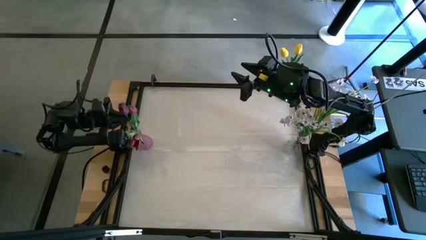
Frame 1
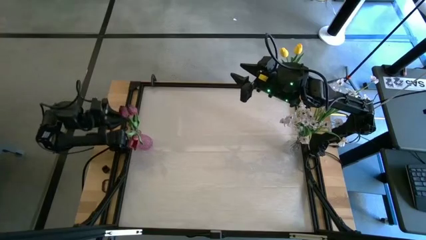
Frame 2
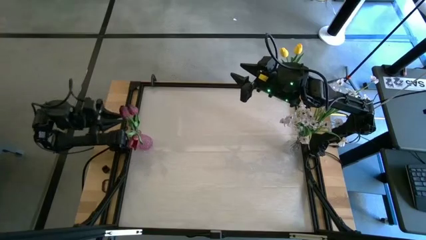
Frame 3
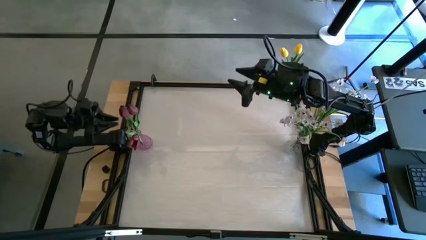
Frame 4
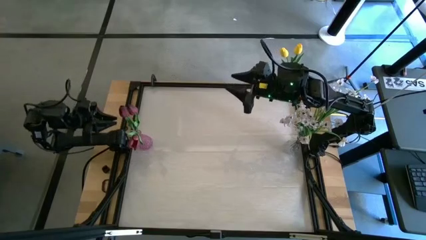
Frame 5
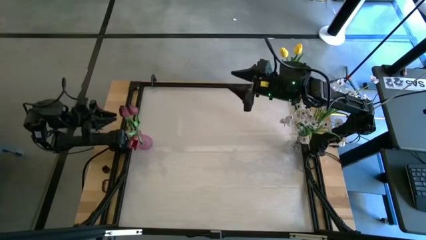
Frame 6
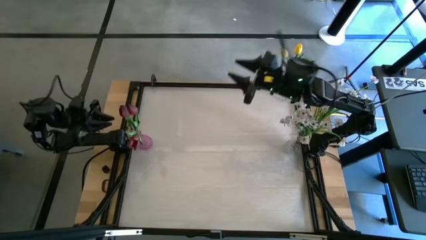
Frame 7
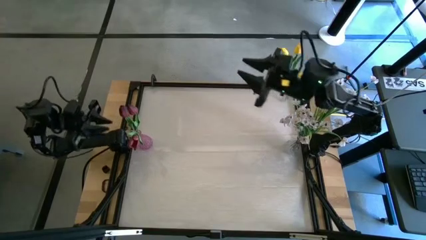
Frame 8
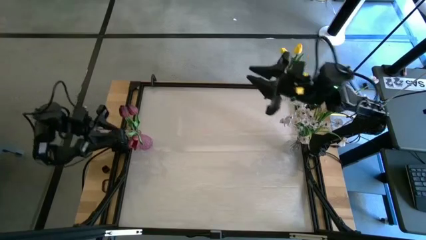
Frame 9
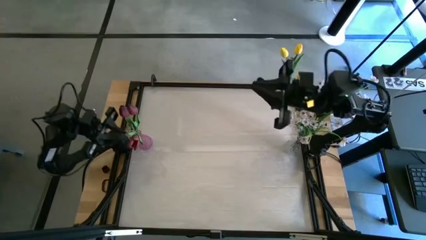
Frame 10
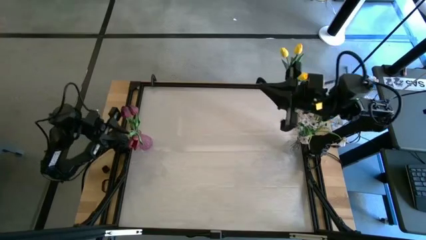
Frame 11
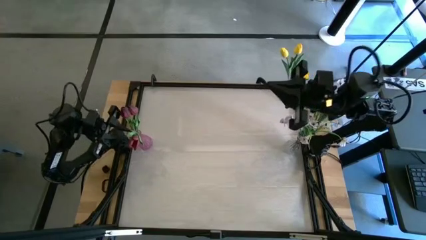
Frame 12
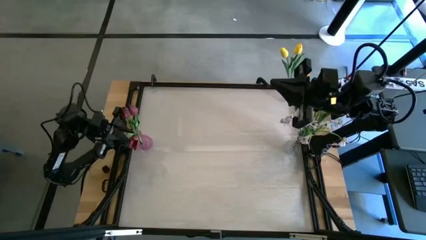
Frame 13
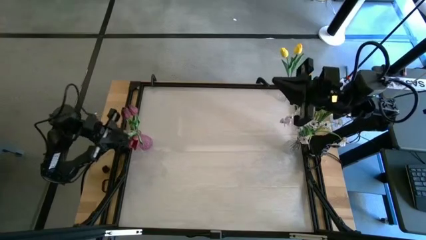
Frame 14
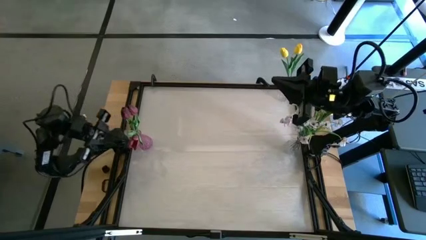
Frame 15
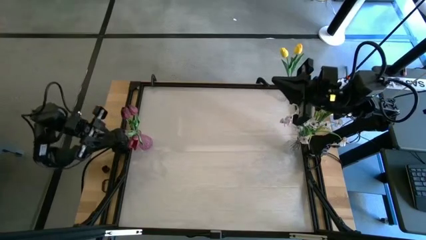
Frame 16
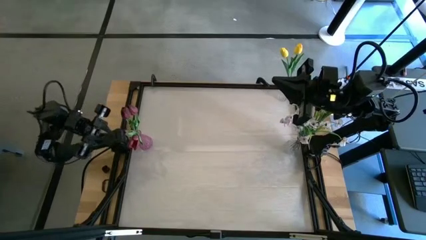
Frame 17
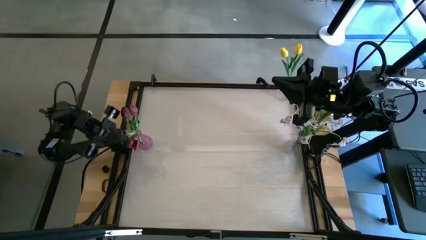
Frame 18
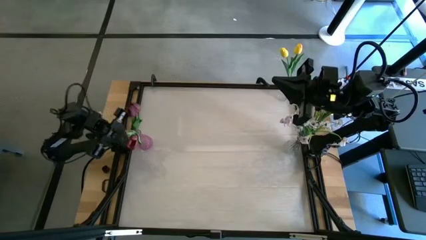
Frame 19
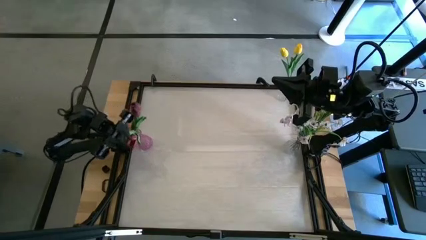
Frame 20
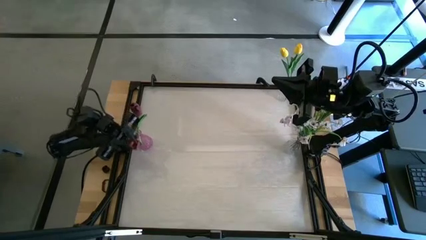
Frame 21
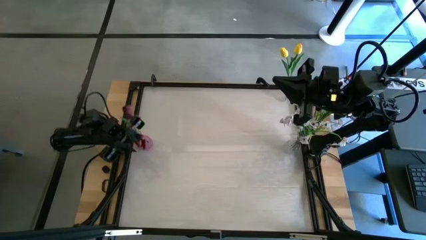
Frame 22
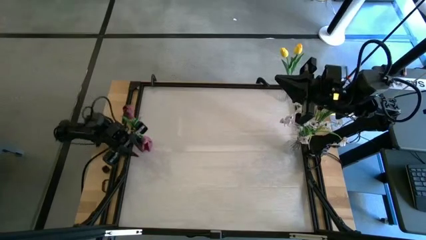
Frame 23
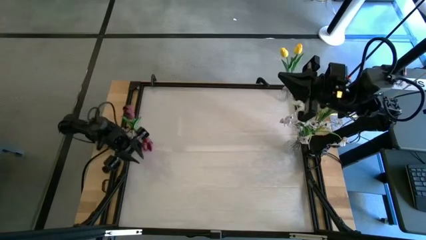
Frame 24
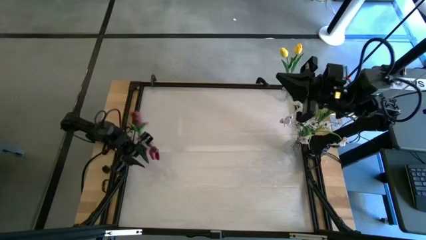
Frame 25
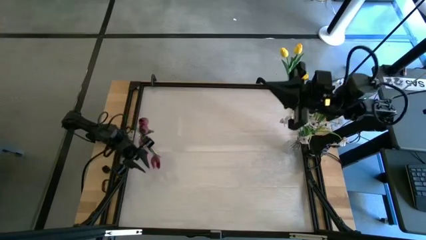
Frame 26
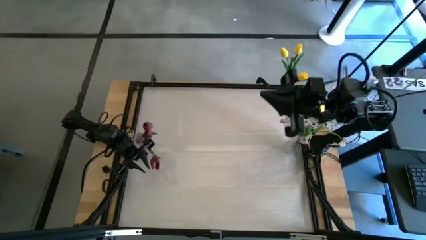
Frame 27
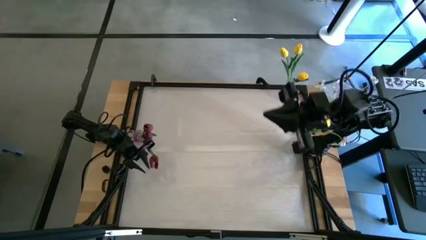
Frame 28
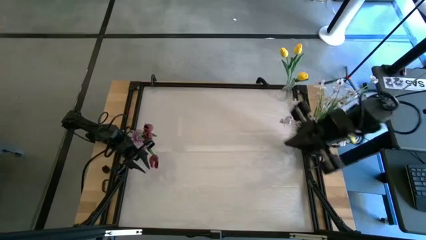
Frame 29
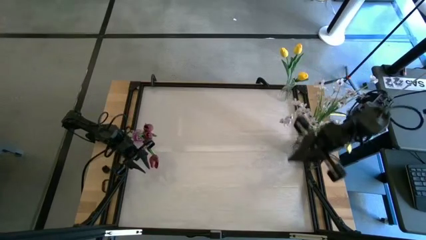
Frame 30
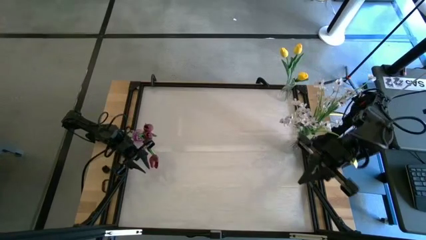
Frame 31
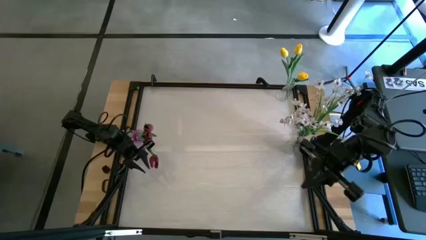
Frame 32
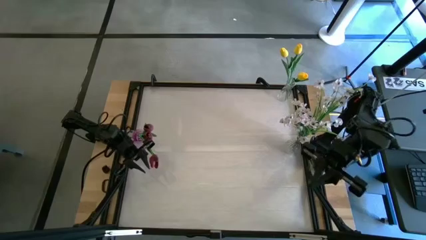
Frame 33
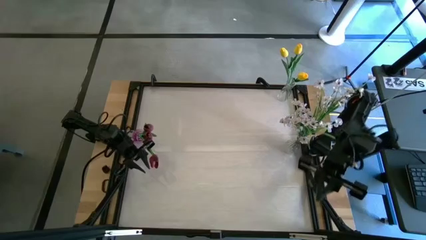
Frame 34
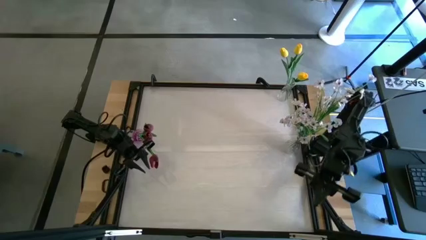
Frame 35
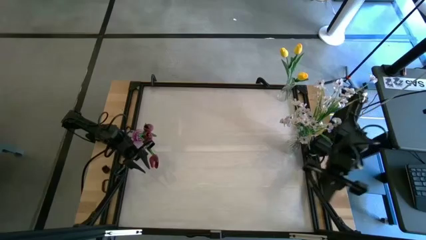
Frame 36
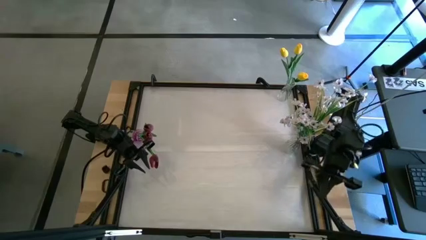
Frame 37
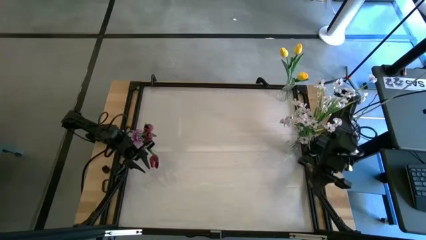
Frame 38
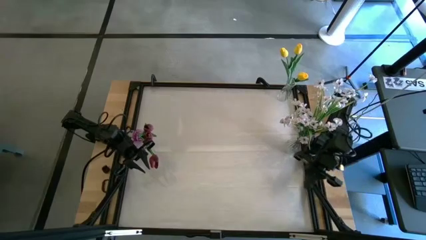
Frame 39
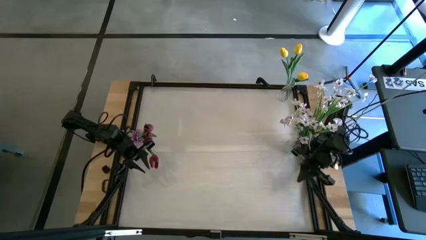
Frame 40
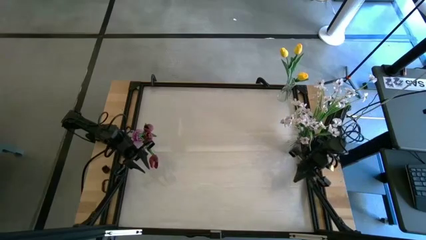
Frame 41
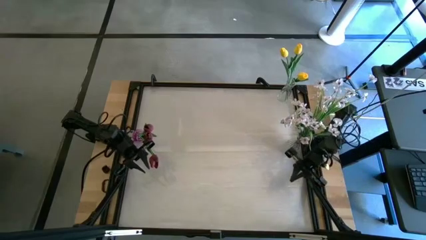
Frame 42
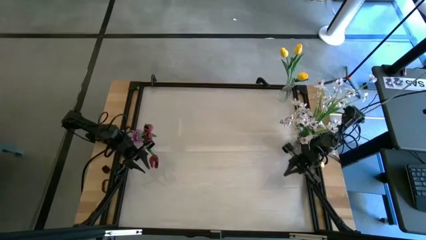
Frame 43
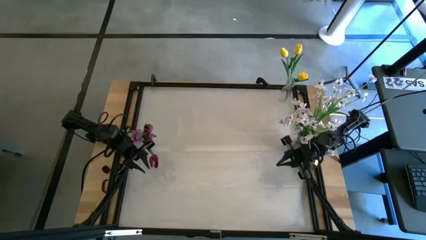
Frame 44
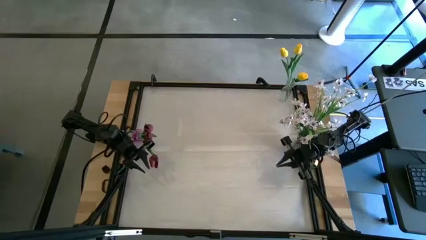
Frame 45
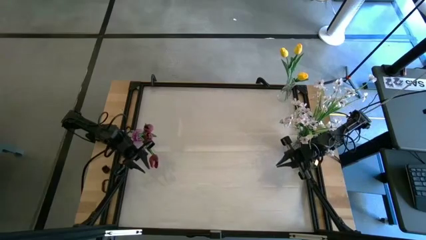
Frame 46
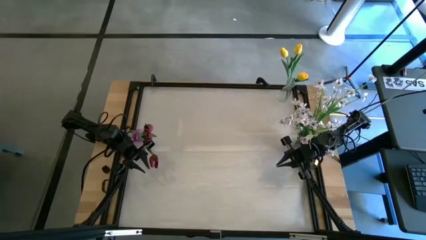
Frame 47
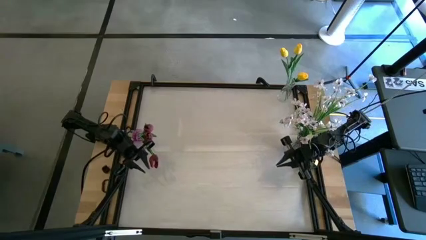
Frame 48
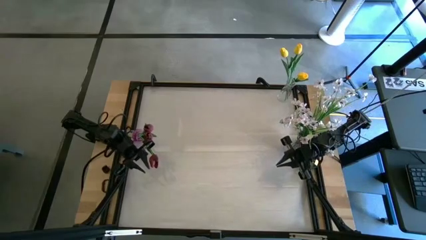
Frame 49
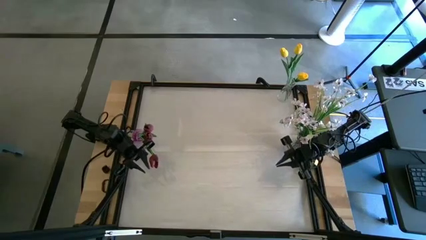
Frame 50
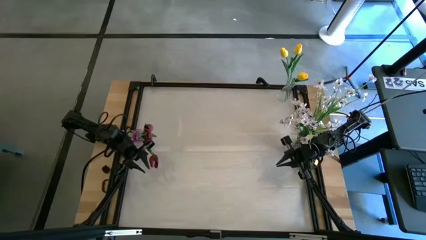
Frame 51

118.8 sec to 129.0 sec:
Task: Sort flowers into vase by color
Return to Home Position

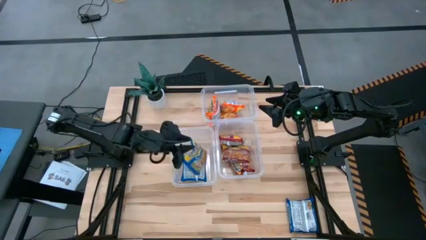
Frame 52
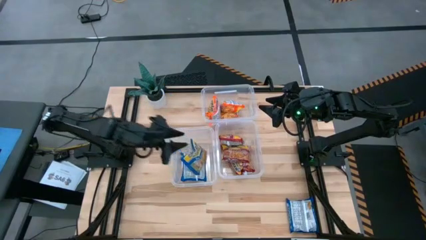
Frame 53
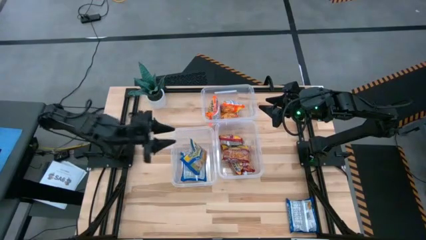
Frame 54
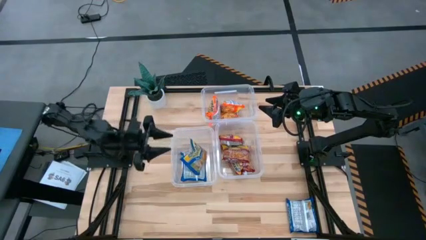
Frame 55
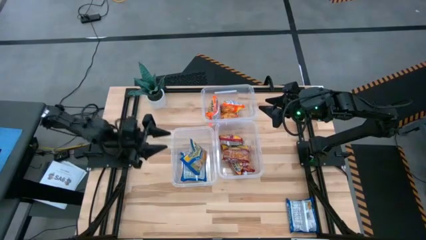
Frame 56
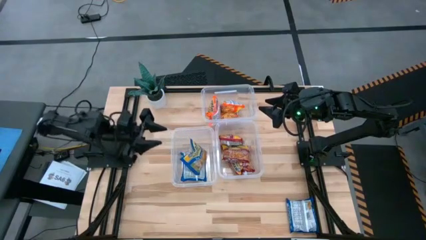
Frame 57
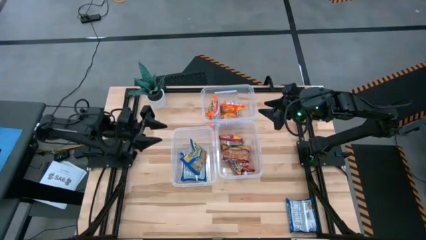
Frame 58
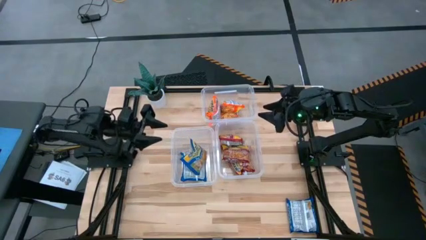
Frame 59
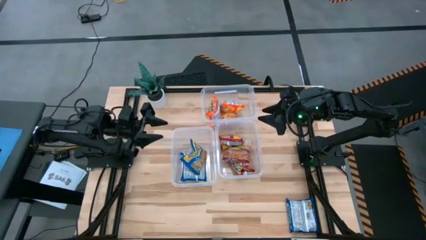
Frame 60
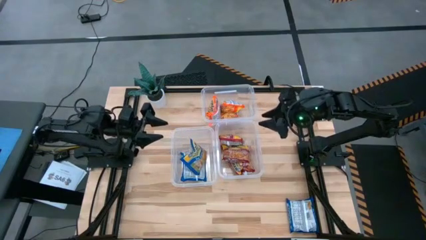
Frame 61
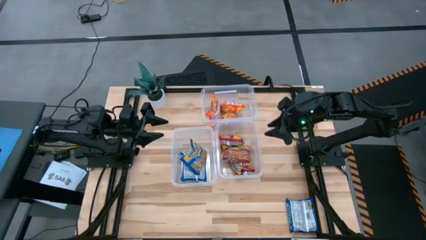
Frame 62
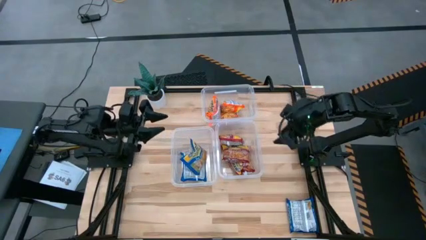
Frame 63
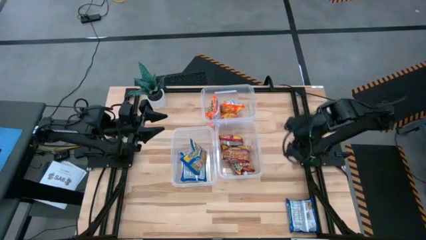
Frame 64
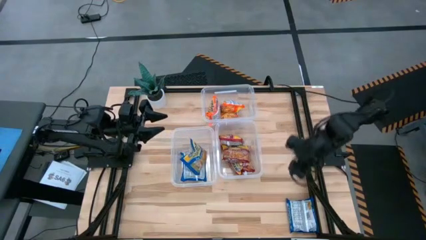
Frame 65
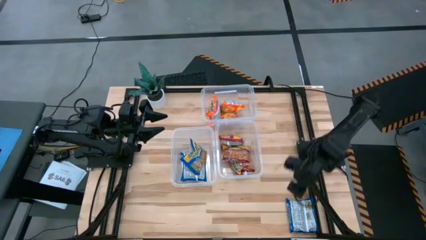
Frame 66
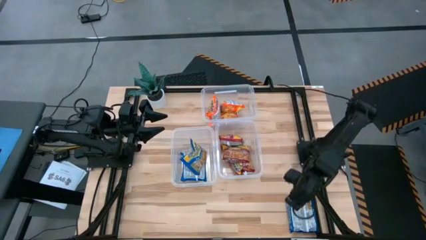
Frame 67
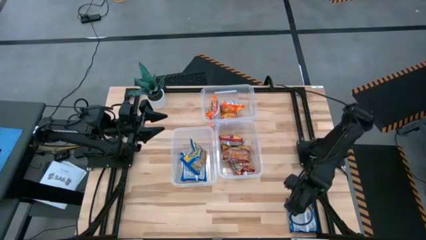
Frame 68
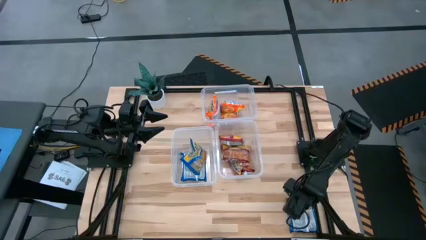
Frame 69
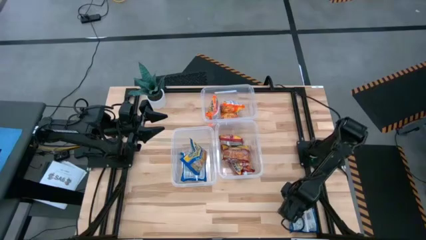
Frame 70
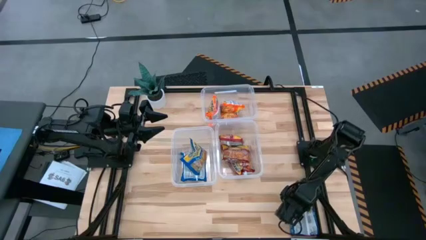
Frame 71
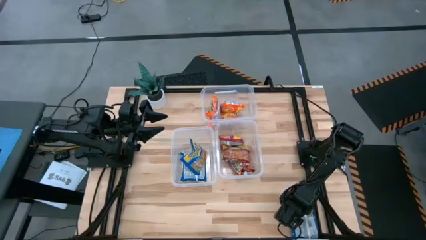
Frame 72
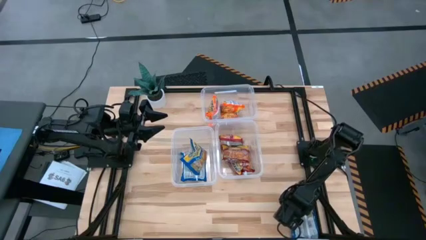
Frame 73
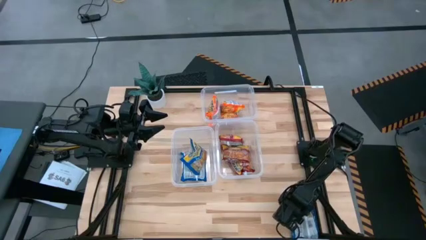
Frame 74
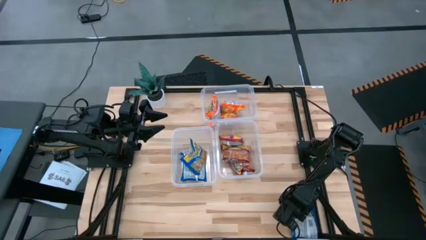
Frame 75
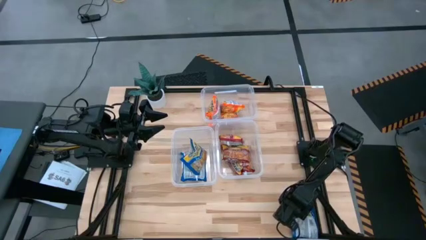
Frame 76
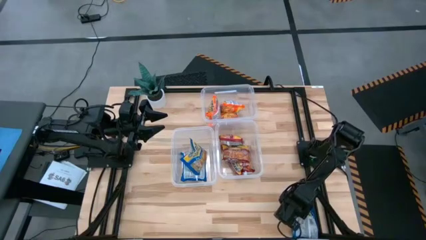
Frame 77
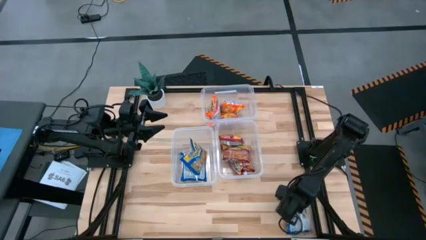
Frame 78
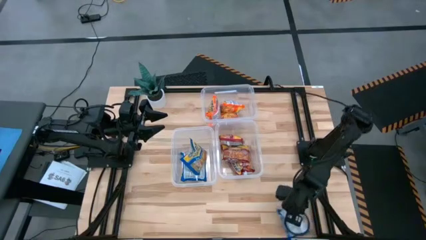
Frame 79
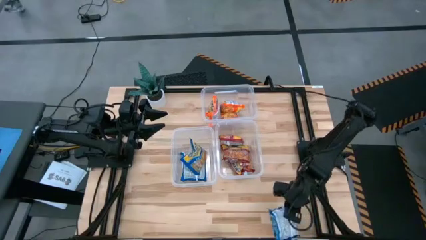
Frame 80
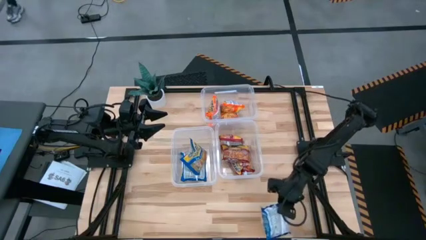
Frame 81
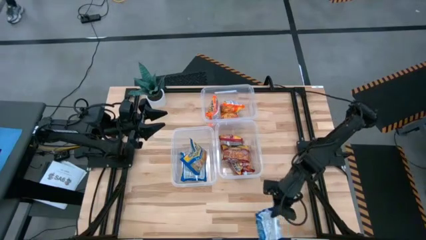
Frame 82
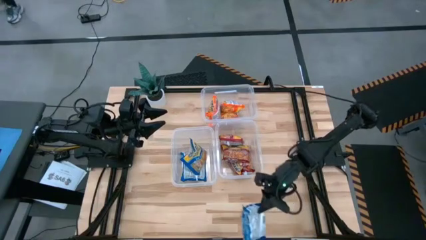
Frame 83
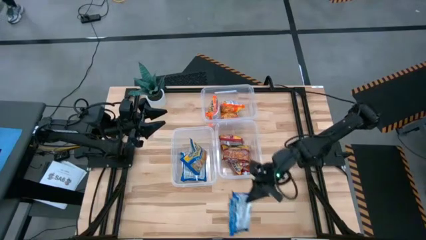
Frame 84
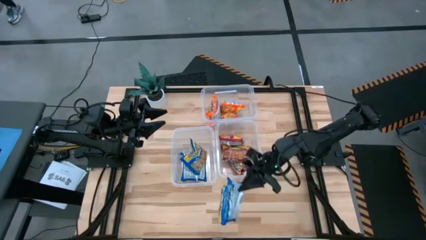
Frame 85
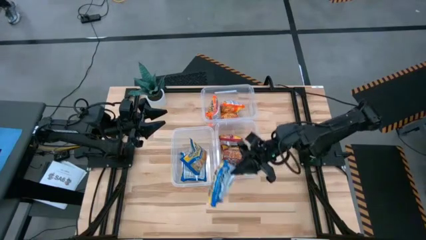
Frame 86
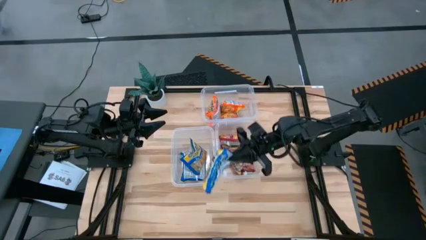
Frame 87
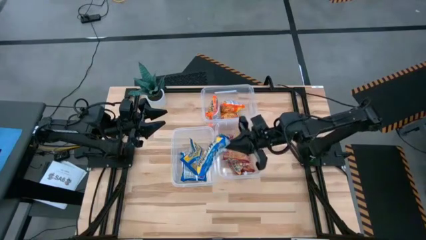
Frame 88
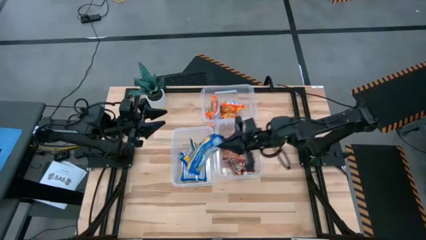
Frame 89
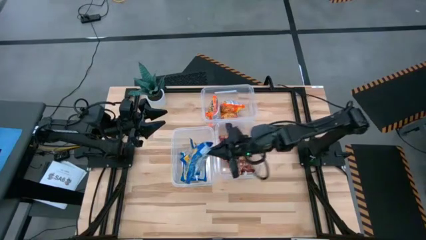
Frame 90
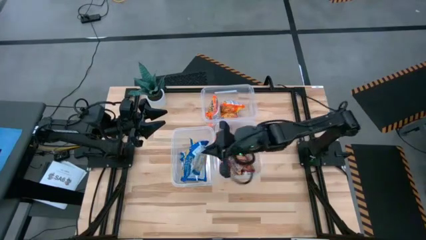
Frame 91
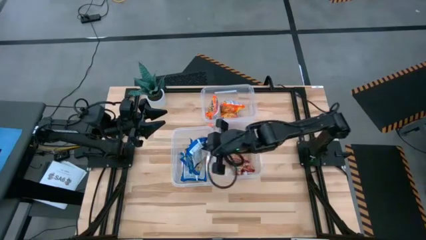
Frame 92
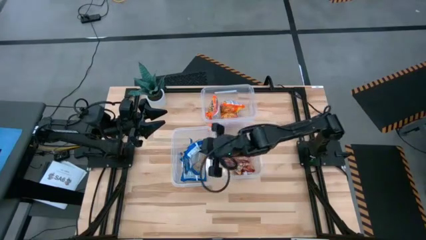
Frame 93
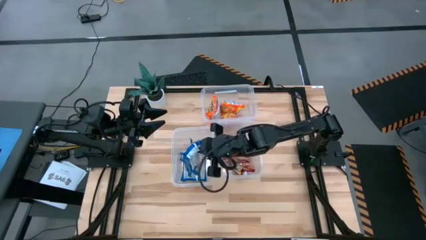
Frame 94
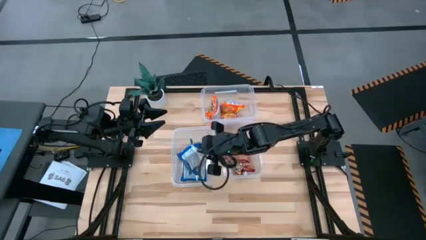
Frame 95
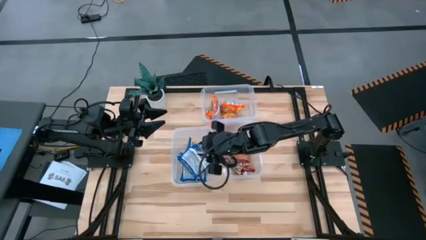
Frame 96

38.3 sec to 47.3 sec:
Task: Sort Maruchan noodles
Put the blue noodle pack into the bottom left transparent bin
